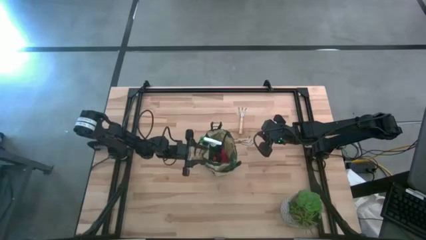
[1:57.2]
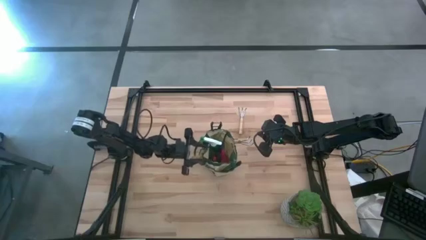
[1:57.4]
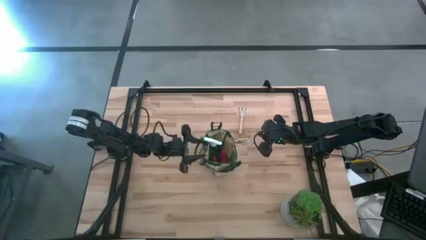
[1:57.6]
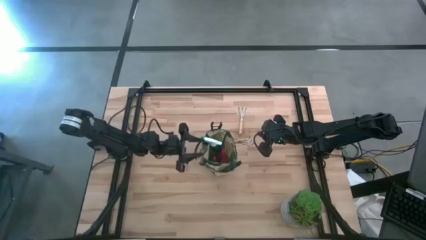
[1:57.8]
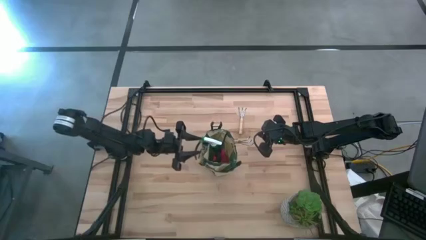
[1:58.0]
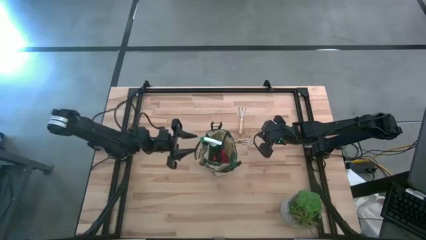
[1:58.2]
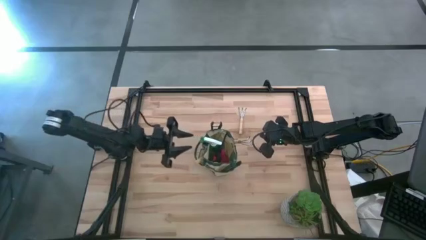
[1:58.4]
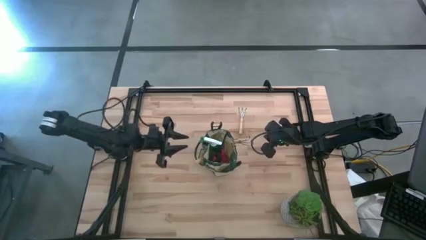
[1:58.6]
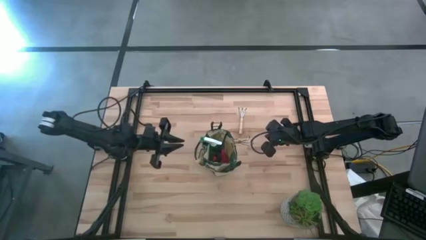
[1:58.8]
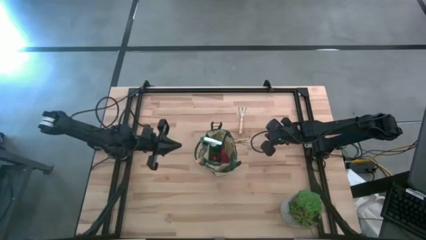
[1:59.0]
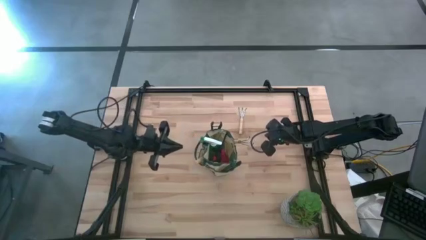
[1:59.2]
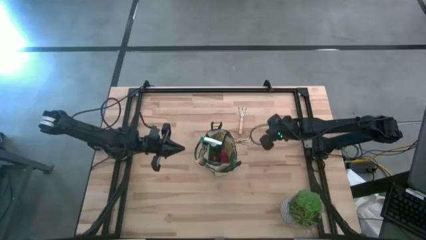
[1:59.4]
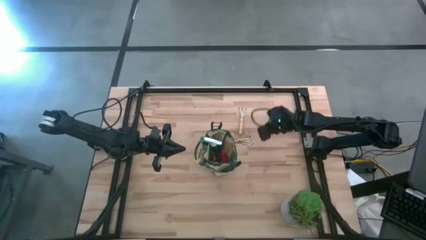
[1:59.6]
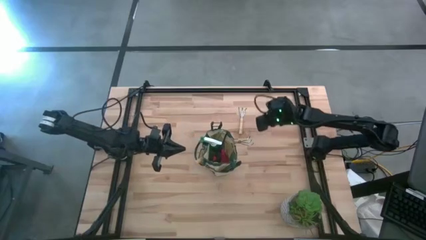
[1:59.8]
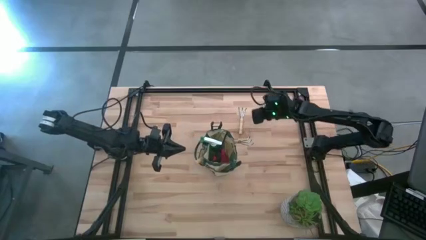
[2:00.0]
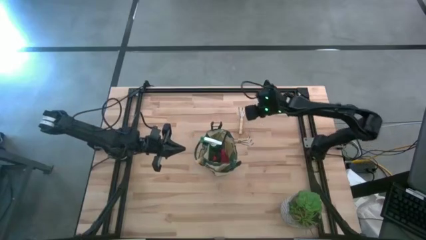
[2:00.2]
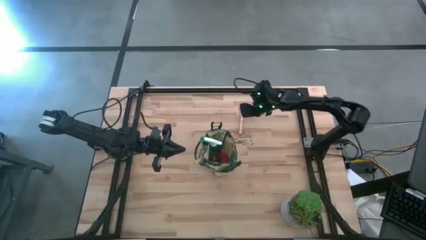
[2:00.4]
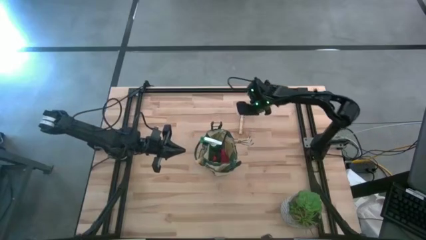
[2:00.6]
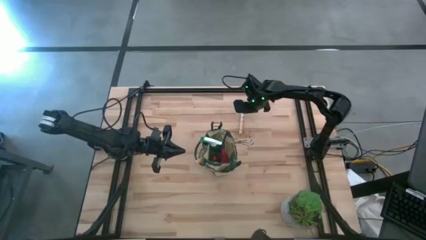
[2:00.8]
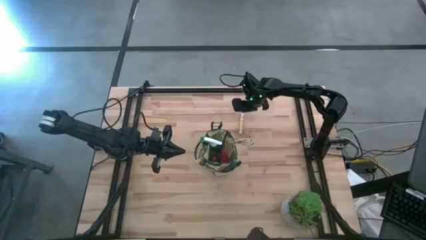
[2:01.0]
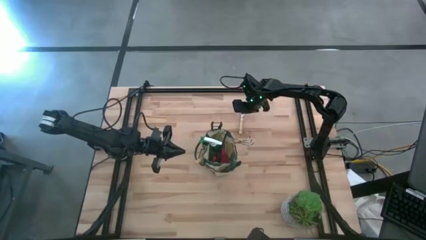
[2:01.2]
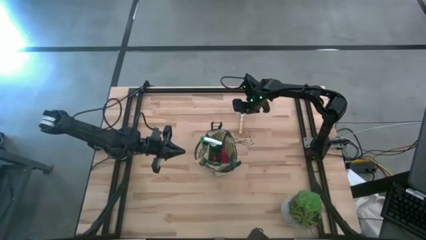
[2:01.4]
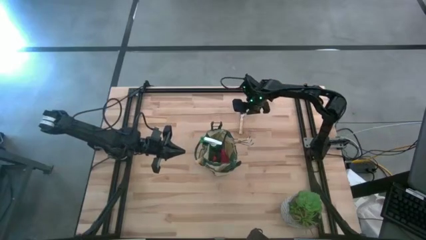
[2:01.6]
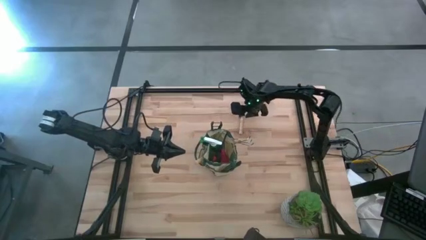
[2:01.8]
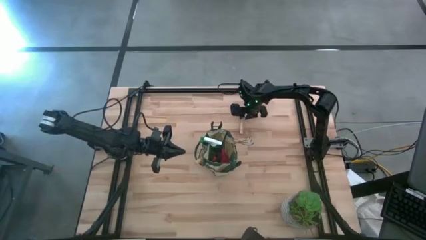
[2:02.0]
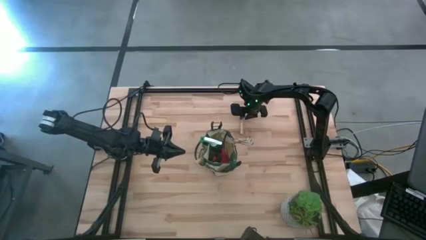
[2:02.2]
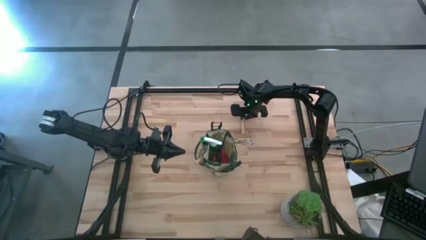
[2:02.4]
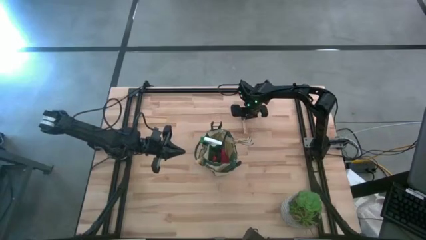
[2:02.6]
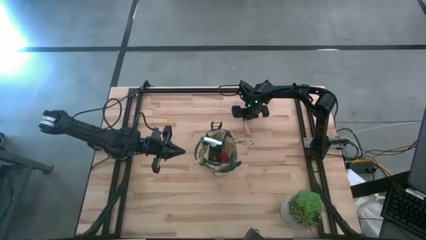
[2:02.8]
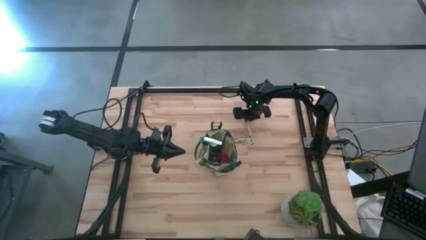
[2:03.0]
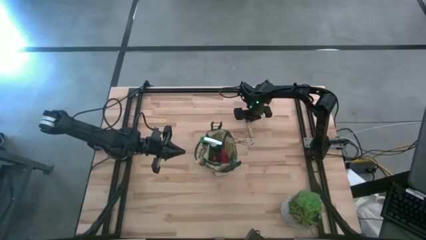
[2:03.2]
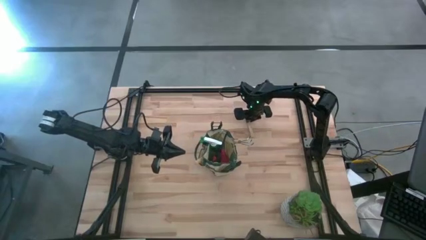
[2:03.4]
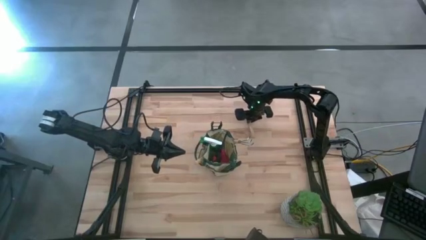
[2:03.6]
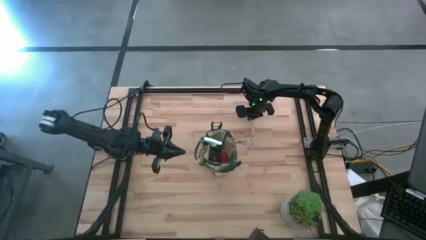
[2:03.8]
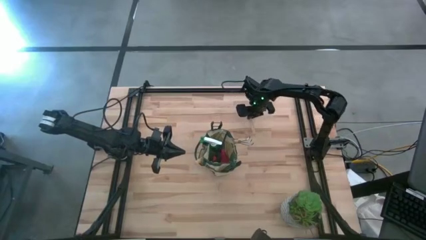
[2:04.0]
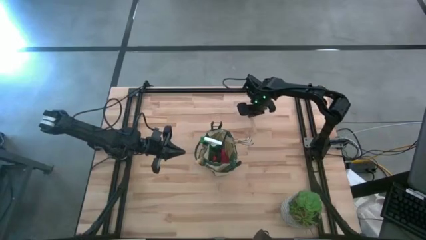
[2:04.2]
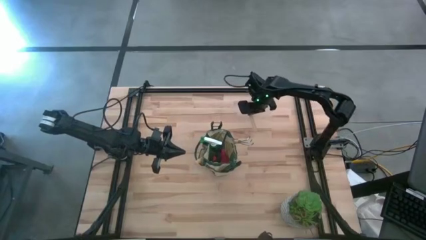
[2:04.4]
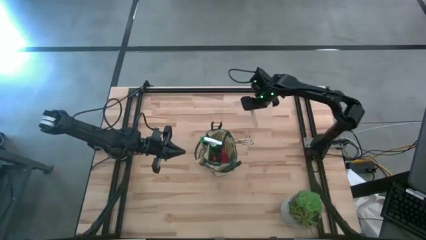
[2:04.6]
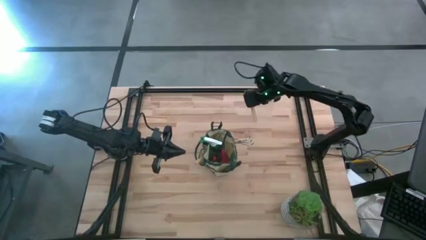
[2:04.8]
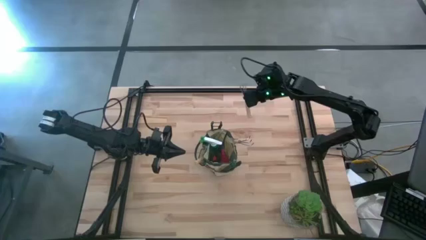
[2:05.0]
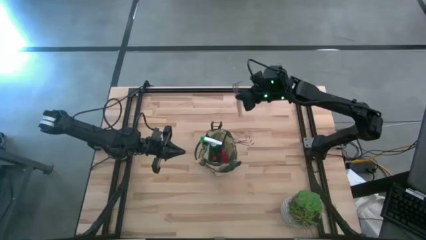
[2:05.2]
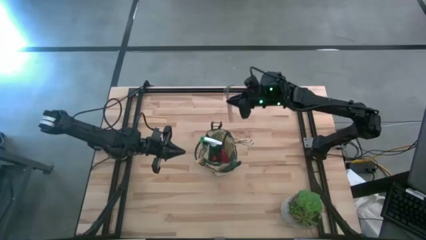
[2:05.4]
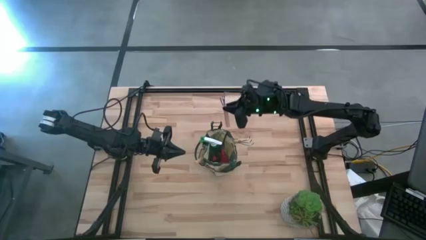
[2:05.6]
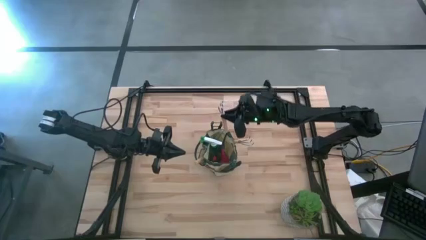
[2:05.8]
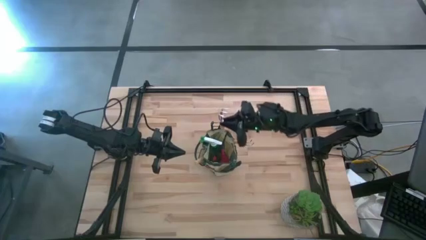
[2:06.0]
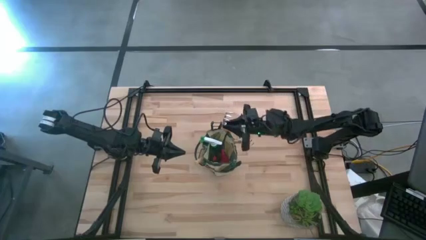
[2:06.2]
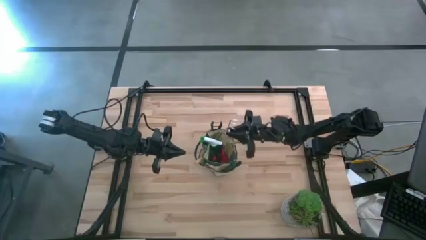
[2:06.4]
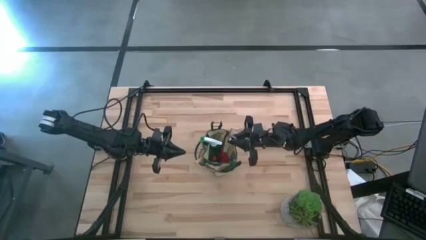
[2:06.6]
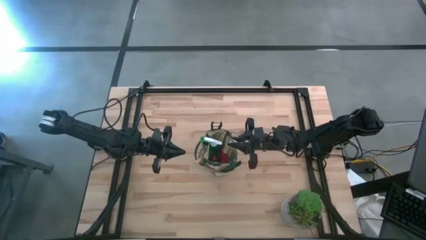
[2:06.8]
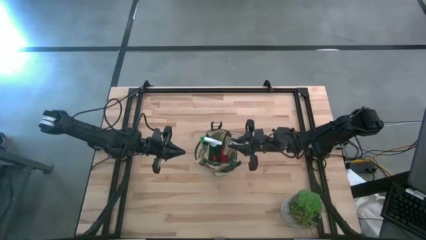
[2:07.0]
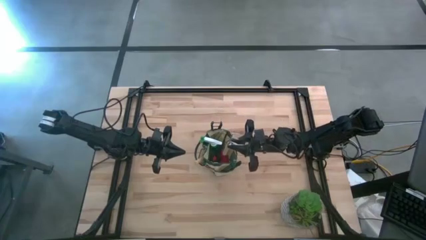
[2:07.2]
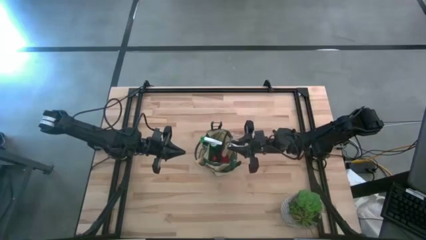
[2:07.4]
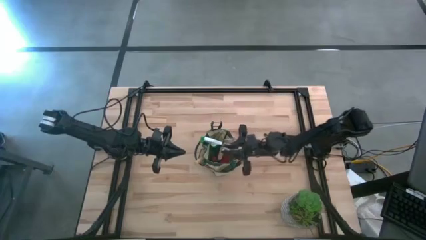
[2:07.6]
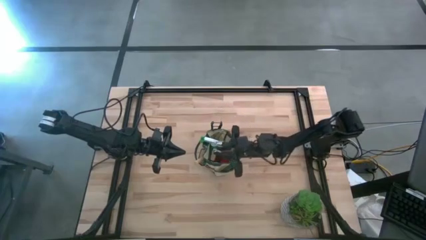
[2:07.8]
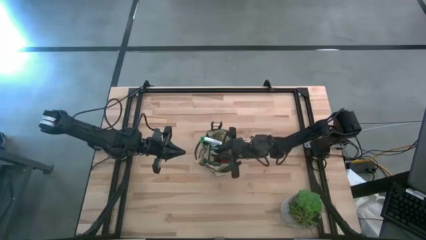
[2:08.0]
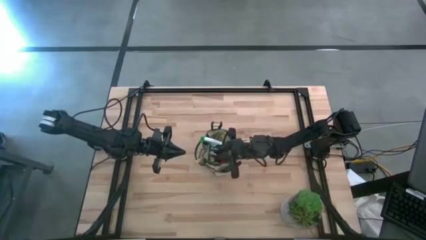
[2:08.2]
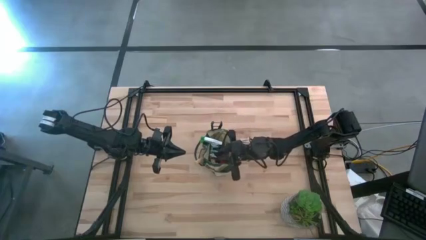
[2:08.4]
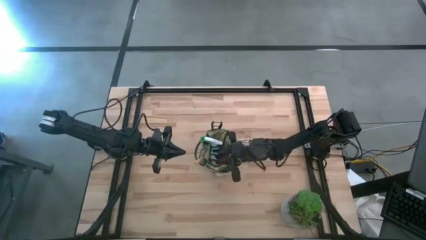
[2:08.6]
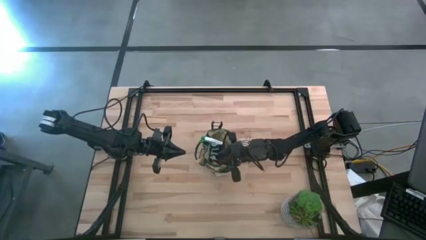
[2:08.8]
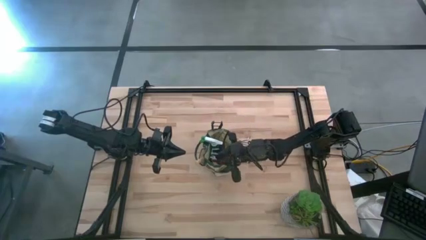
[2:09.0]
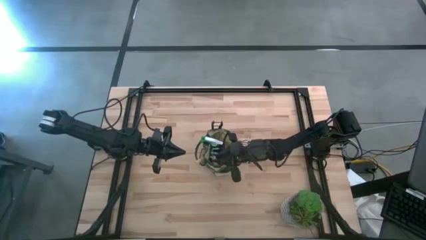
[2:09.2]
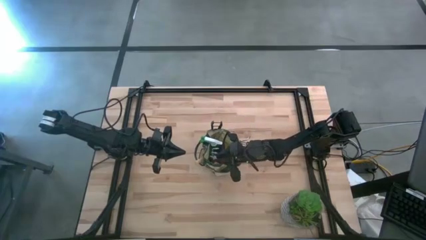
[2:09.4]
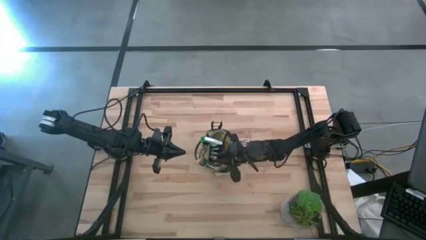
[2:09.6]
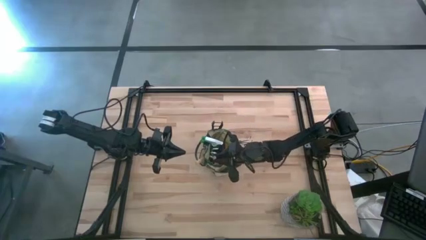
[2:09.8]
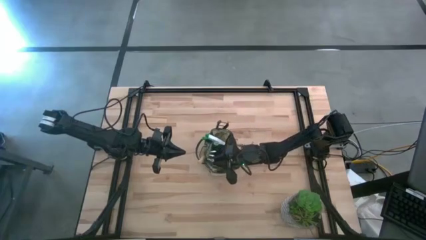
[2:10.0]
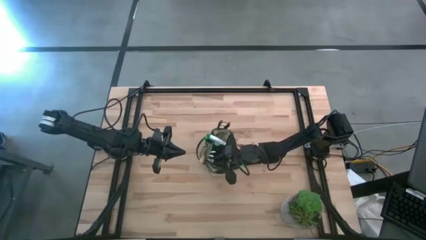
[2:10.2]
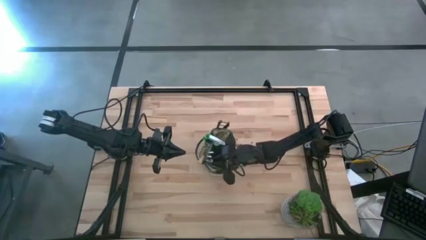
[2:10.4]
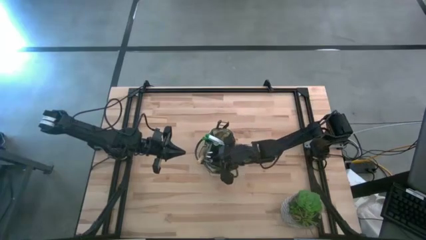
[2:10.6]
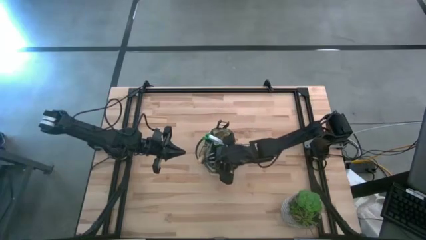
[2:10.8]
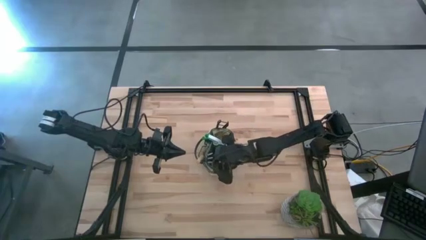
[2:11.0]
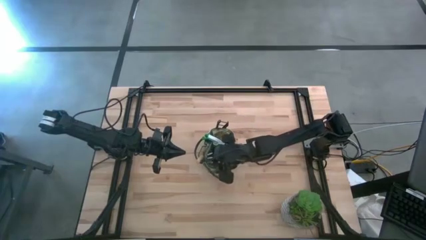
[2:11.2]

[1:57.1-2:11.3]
Task: Pick & Place Garden tools in Gardening bag
Put the light brown hand rake into the white gardening bag

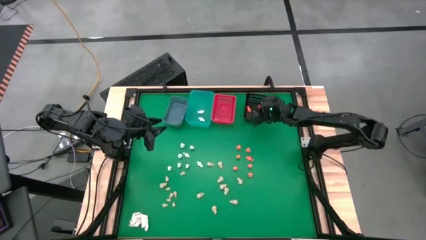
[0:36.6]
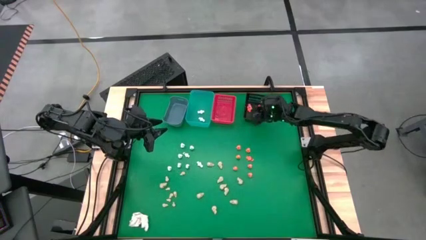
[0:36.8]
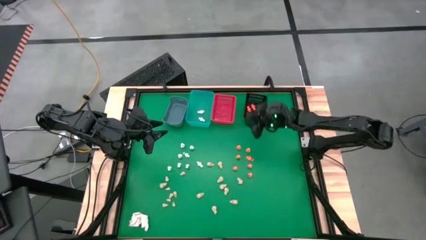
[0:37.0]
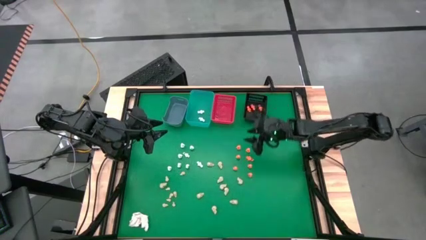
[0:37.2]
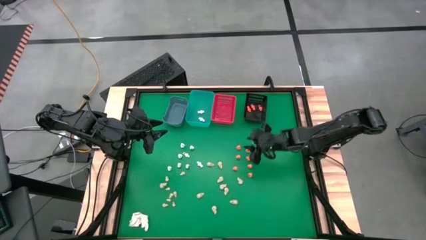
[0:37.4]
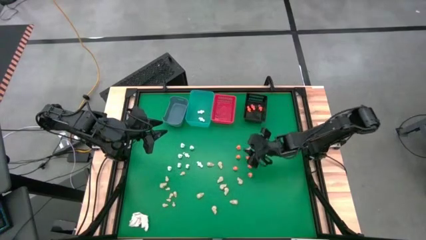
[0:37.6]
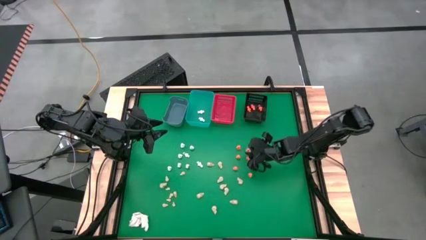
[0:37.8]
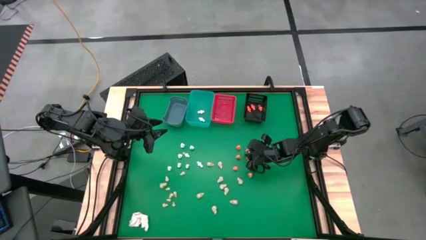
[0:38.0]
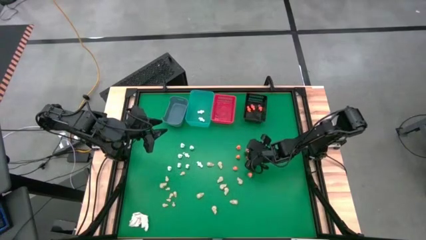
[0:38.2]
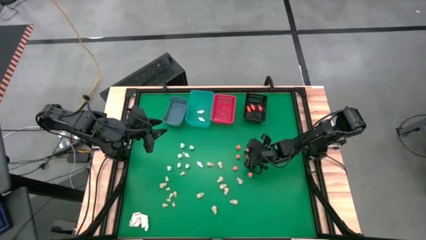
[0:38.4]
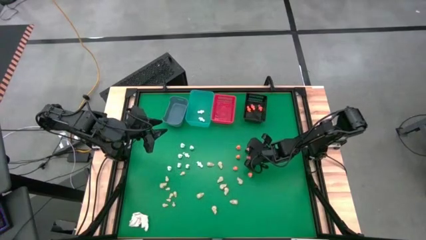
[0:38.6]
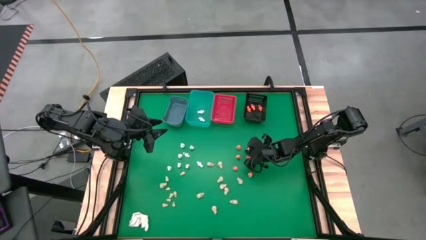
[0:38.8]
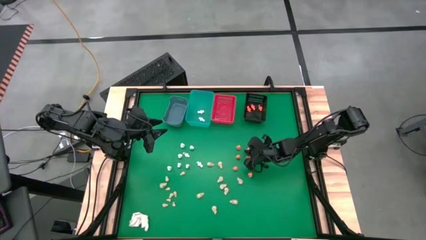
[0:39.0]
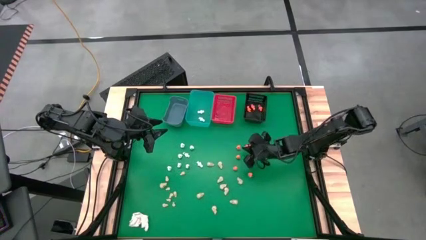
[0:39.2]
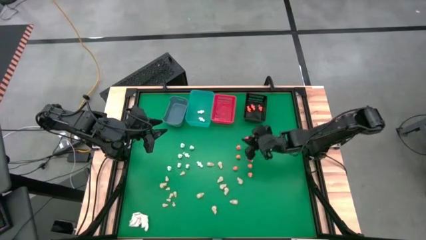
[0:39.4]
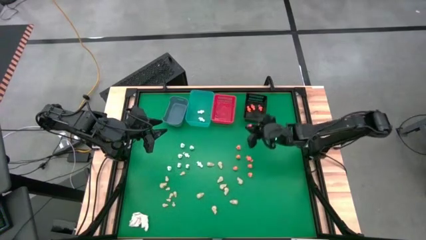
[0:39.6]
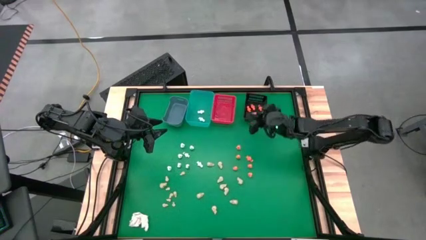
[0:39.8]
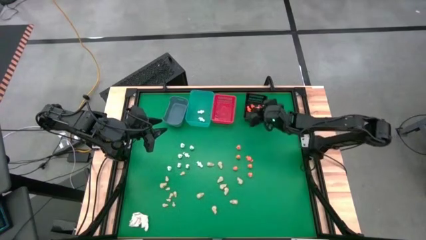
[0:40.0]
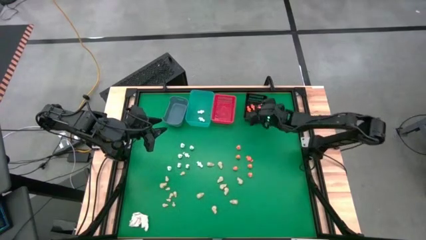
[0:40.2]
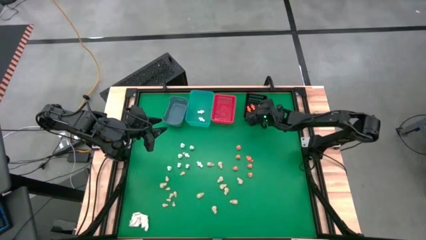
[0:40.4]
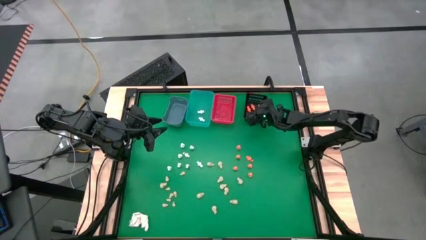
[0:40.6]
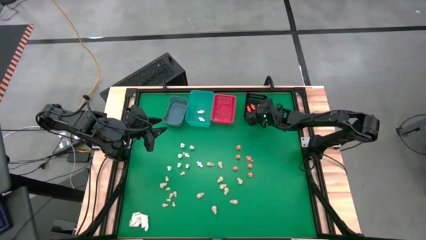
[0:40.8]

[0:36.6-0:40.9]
Task: Sort Halloween decoration
Put the orange skeleton toy into the black bin
